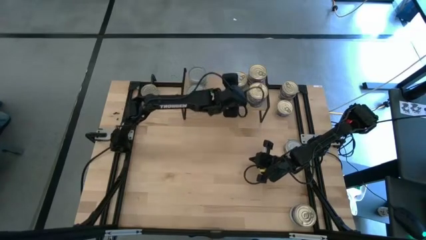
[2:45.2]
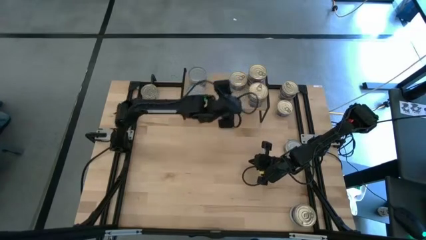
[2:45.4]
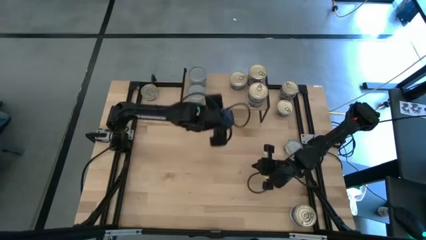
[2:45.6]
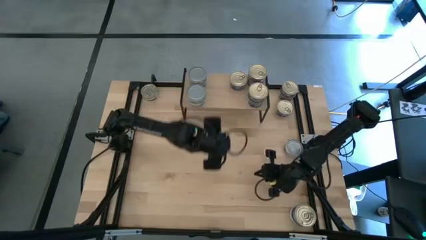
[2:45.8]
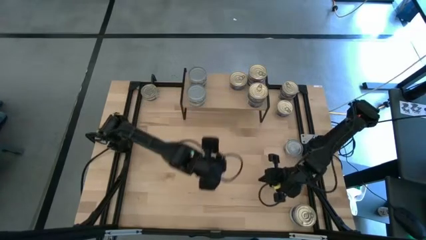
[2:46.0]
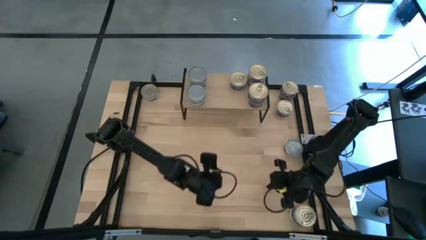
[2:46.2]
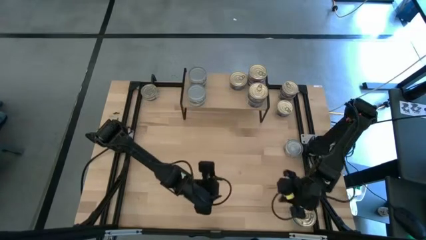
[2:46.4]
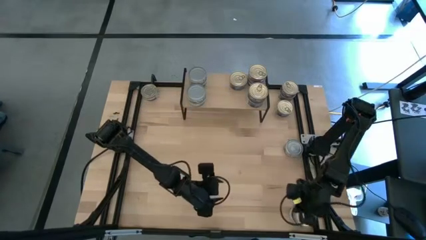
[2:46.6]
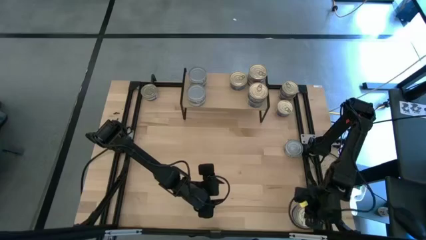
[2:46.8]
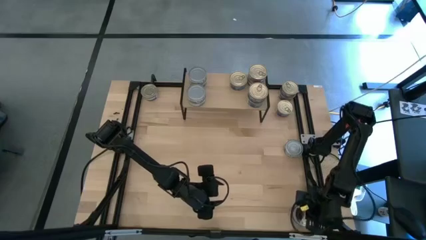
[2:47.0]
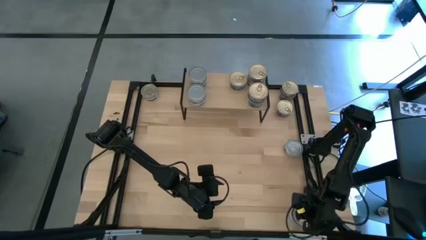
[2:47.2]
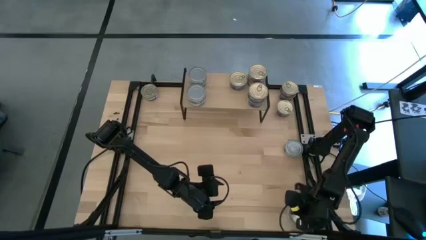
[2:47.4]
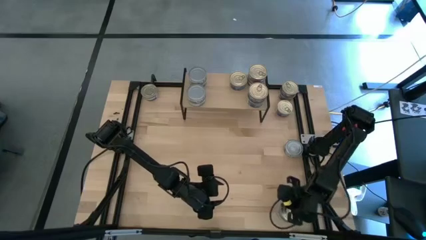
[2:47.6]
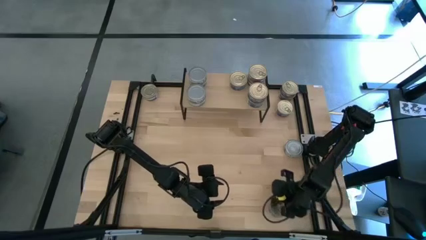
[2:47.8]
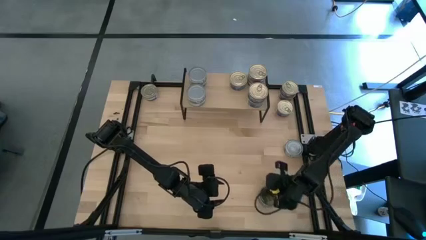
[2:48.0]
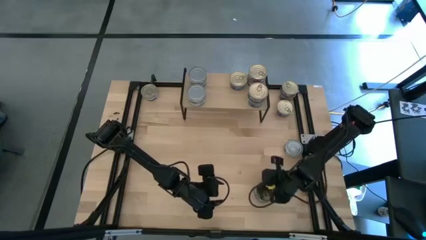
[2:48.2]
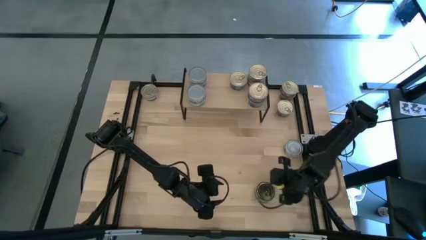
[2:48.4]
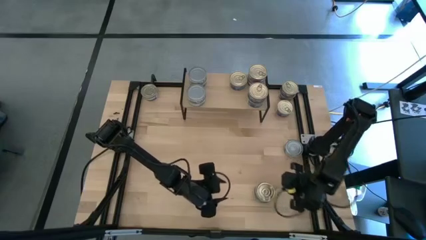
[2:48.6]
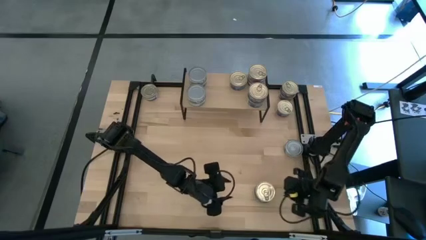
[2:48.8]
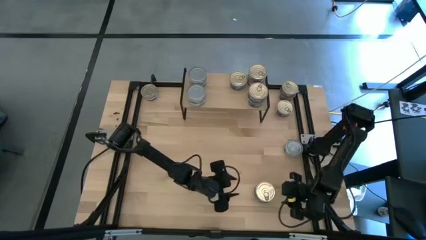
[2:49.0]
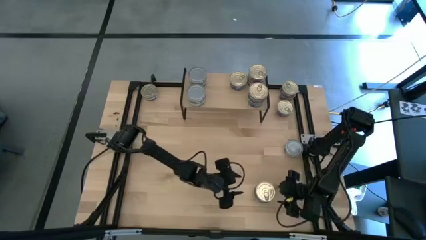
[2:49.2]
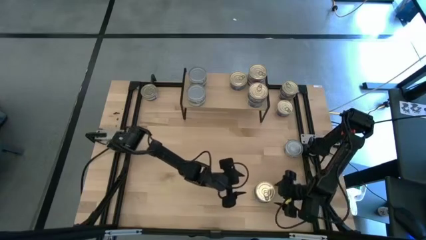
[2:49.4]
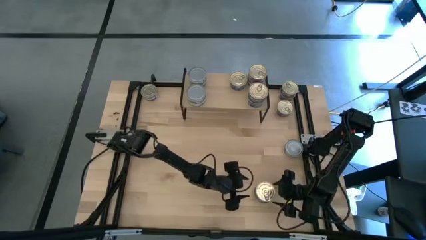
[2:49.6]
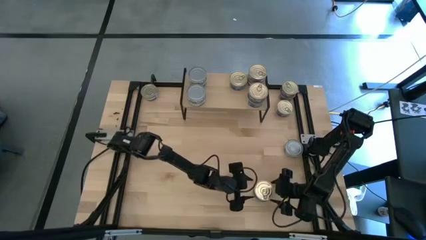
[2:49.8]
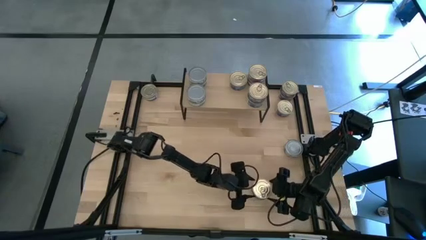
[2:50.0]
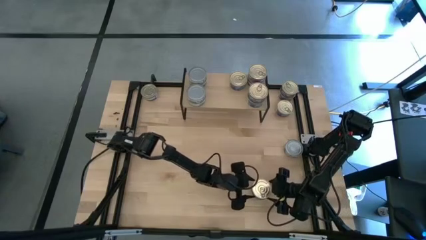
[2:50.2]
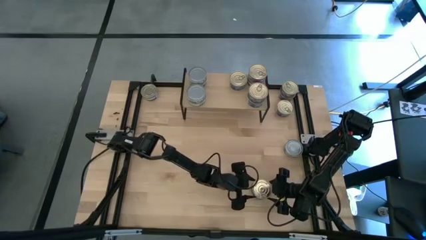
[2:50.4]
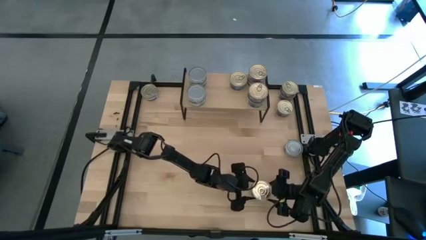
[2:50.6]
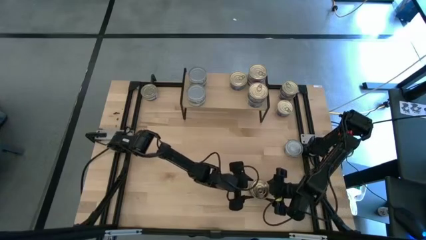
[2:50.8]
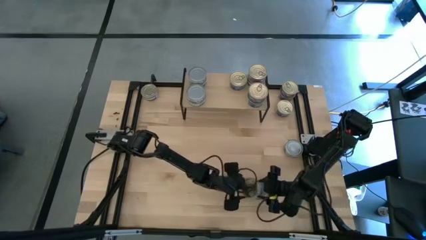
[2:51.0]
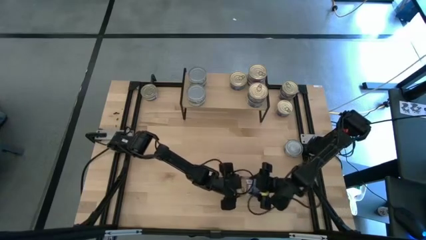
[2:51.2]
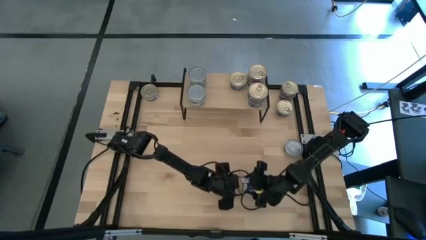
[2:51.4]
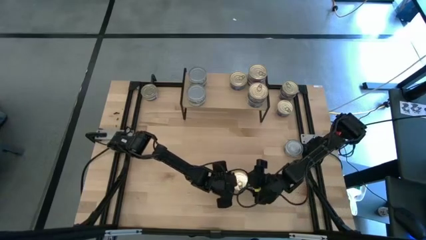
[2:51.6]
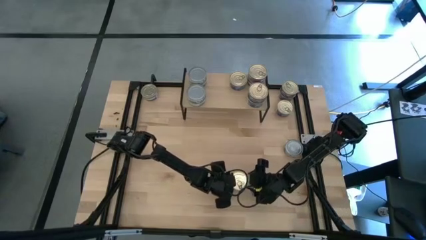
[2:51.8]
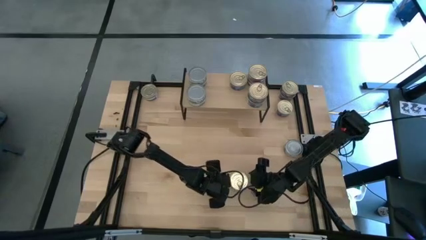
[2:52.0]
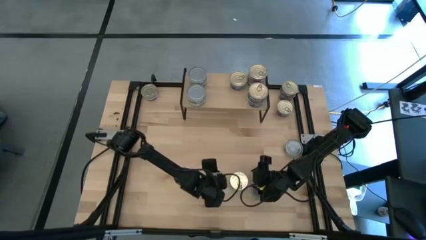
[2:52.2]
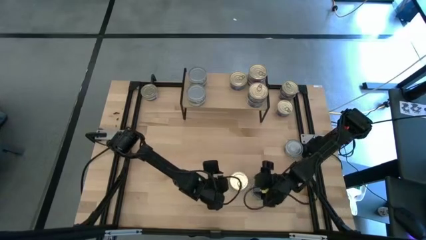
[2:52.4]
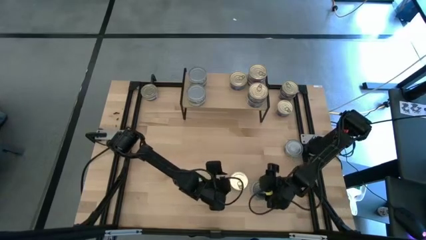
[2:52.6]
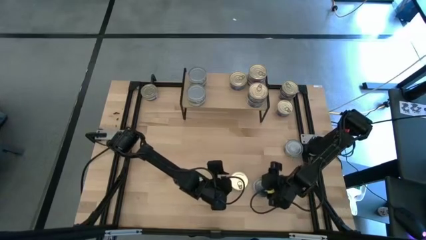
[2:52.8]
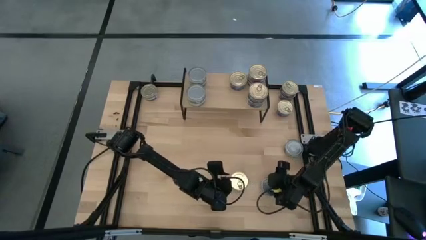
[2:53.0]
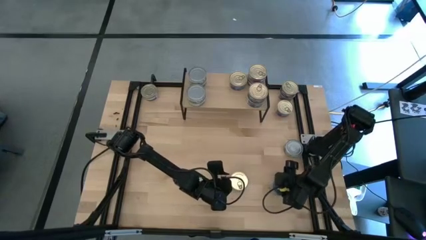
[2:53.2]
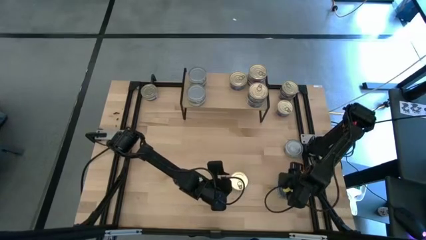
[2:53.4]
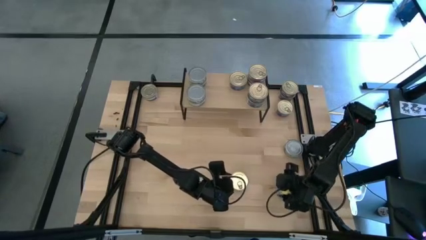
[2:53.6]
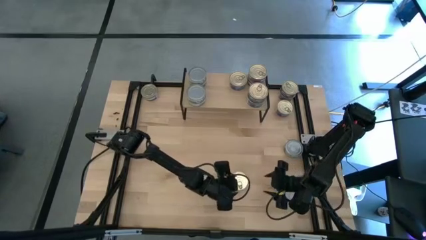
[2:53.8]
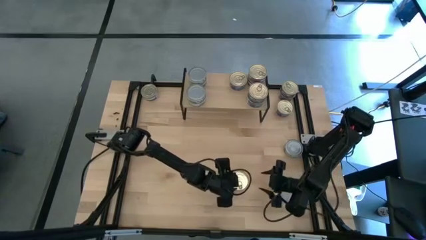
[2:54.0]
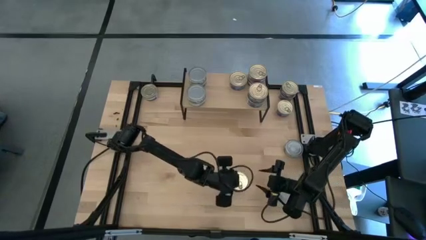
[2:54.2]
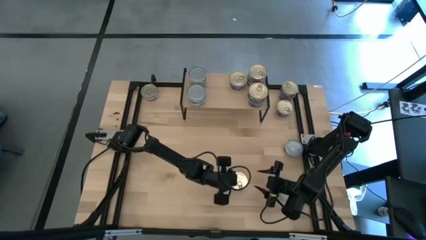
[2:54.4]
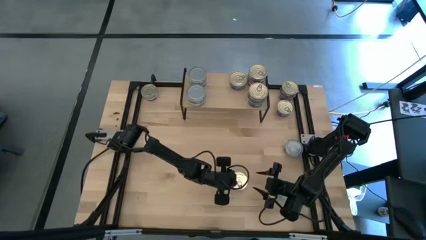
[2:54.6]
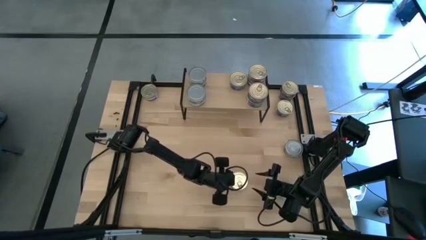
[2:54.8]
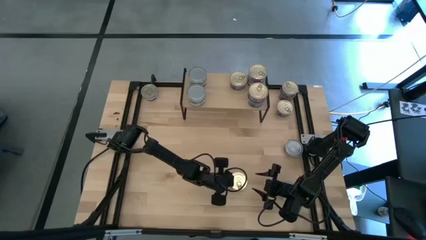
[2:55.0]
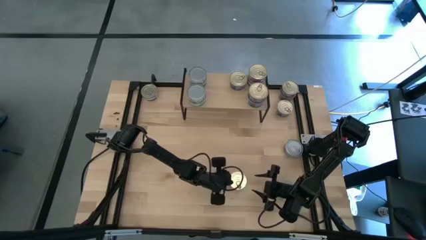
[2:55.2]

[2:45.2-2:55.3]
Task: Stack canned seafood by type on shelf
Stack the blue pink tuna can on top of the blue pink tuna can on the shelf

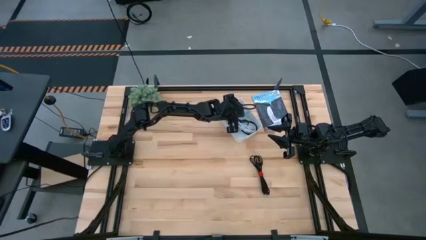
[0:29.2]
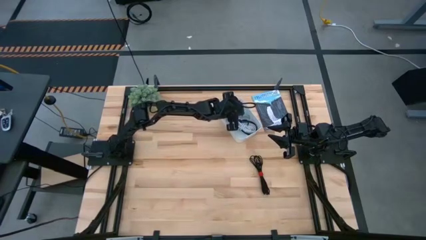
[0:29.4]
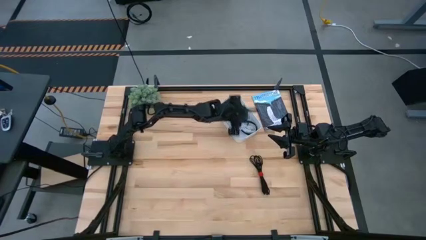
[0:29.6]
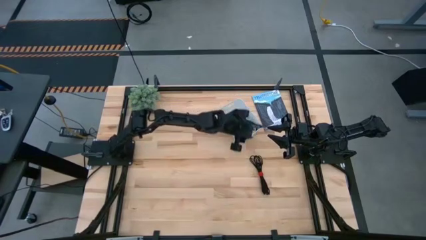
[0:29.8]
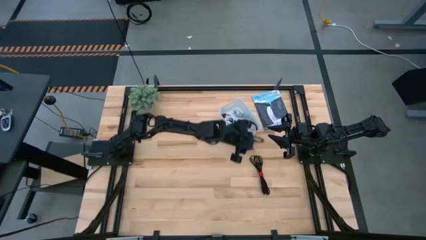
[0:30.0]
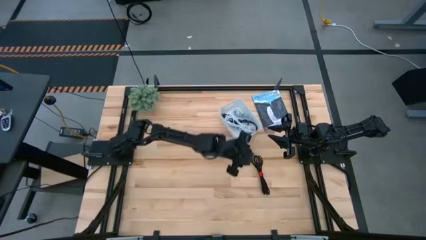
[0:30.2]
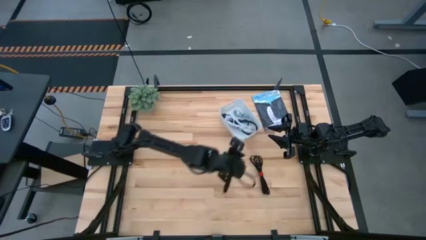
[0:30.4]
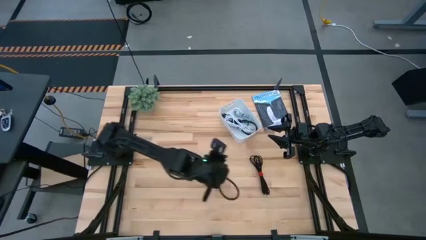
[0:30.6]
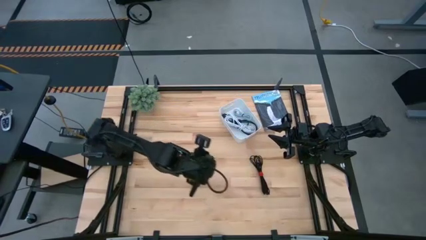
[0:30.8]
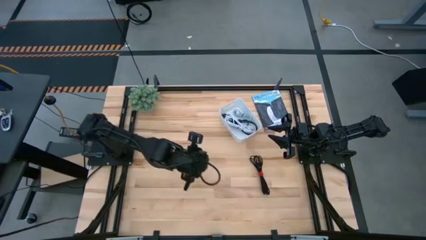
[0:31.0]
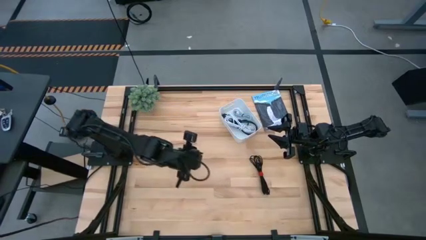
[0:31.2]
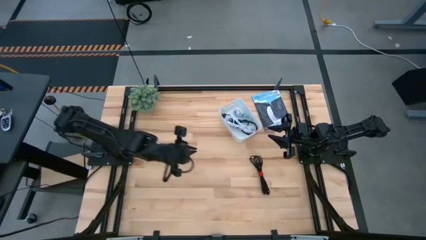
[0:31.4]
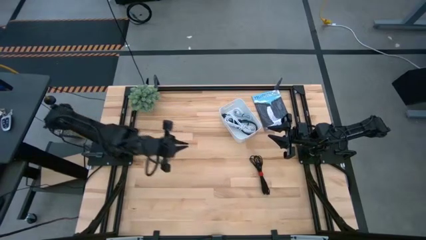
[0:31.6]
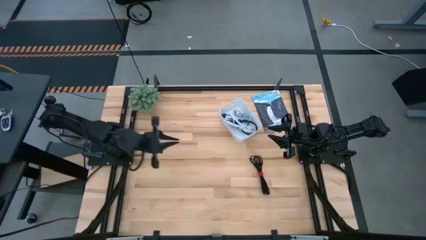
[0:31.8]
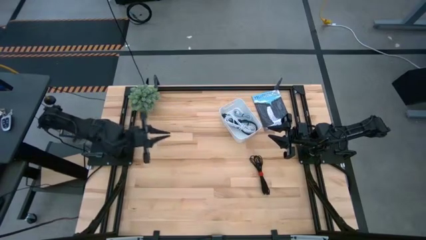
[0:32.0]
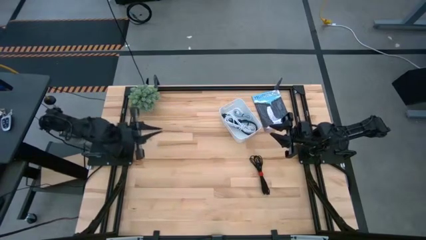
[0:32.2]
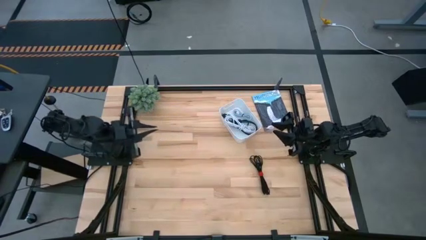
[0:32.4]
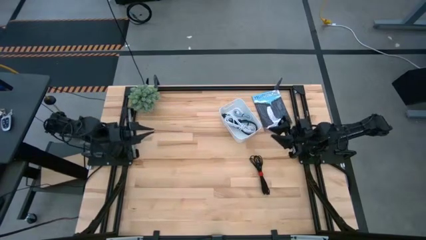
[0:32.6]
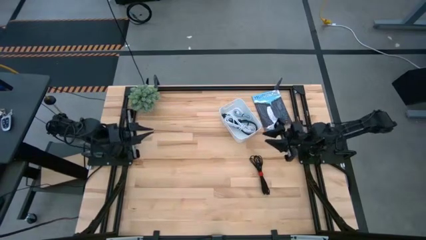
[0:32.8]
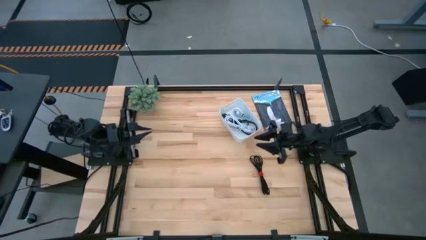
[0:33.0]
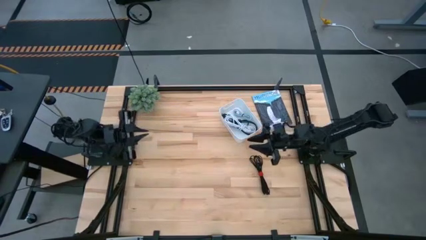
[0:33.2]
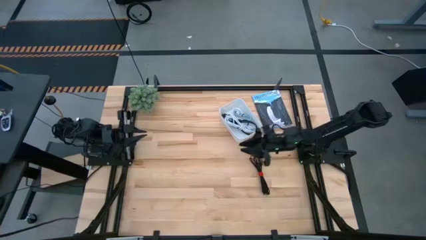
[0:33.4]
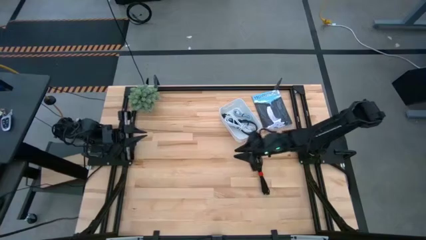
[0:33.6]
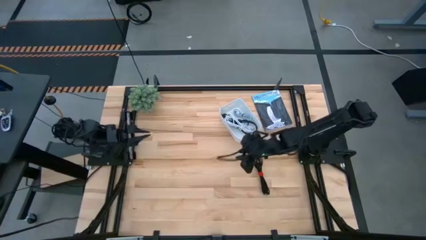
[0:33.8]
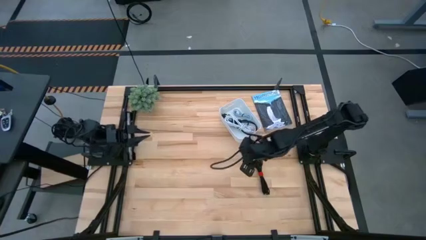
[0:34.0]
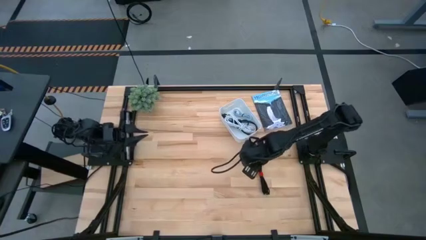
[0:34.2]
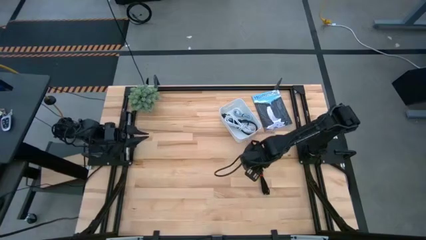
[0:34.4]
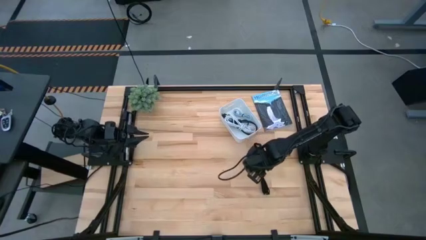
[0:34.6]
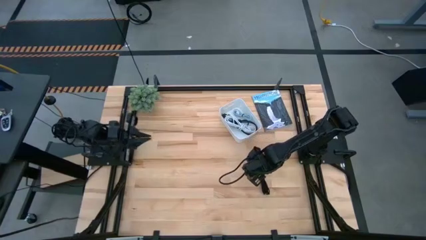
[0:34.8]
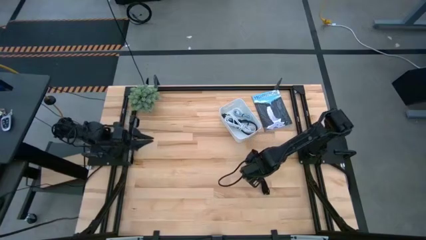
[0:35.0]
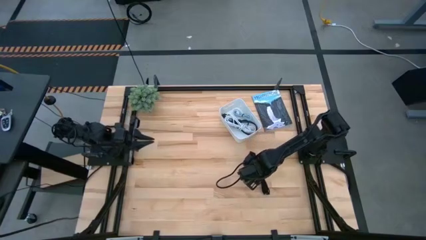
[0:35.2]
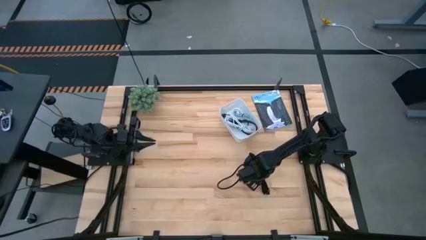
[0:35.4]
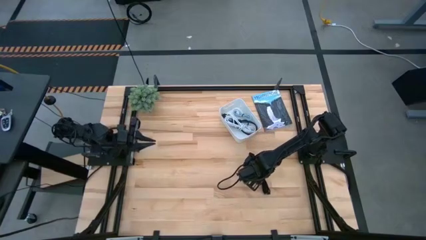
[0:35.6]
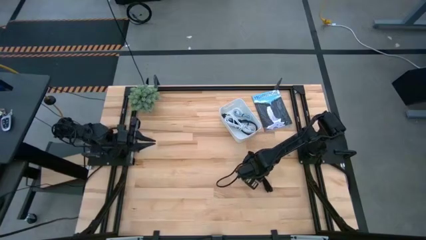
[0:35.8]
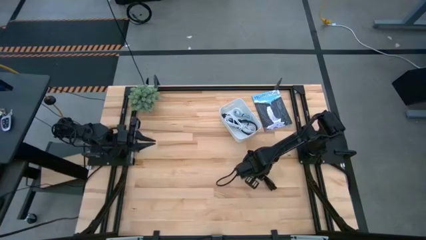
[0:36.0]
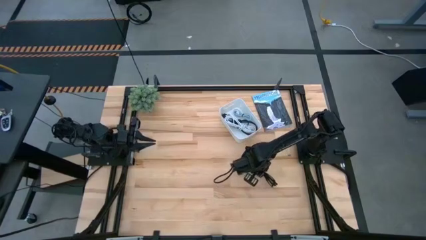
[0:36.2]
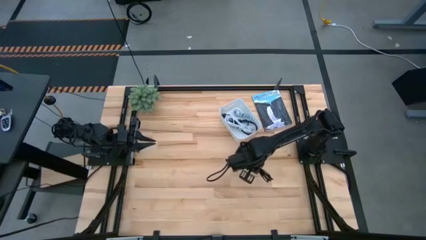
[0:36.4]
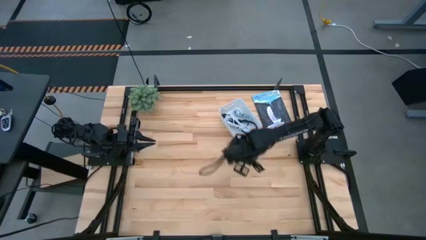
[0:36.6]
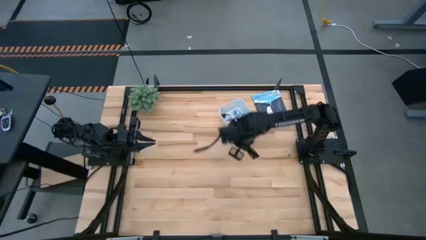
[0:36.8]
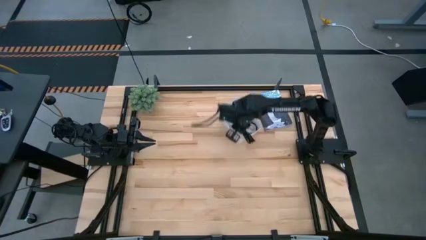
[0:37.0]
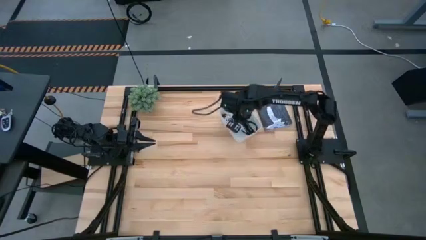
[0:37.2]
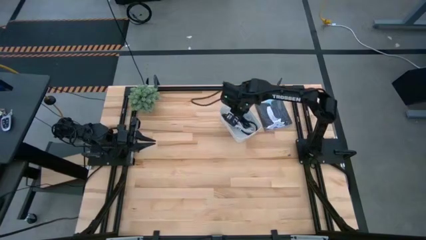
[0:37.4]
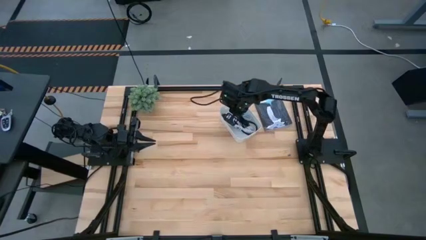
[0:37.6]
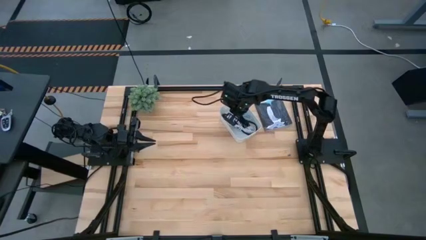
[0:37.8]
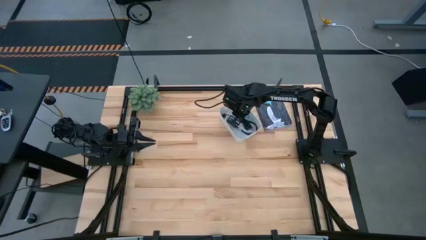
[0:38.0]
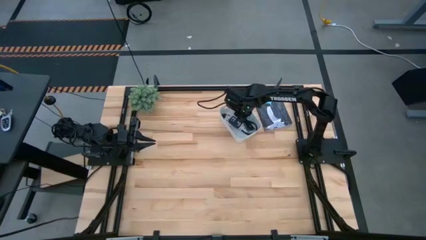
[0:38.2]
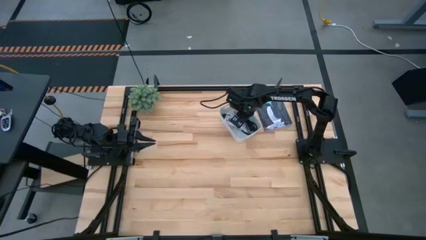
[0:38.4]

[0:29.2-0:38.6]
Task: Pick and place USB-C Cables
Put the black charger cable into the white bin
